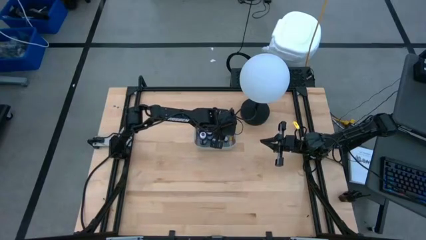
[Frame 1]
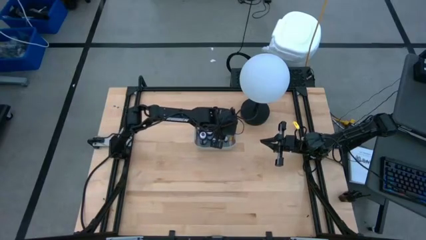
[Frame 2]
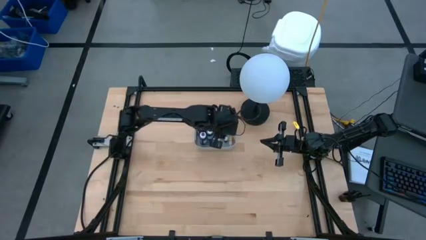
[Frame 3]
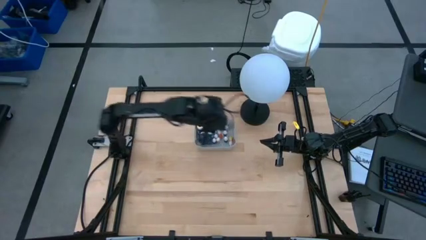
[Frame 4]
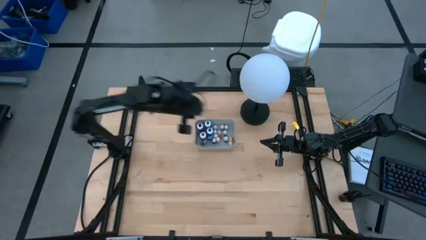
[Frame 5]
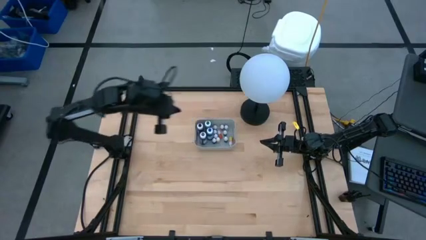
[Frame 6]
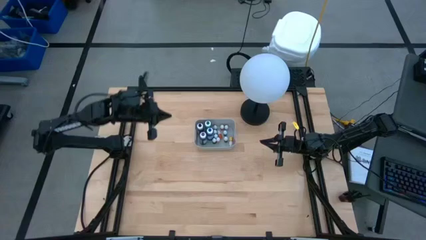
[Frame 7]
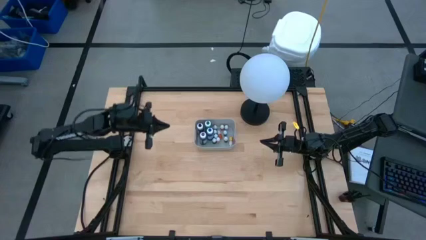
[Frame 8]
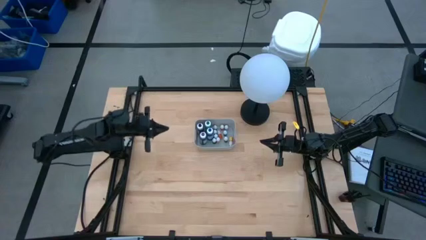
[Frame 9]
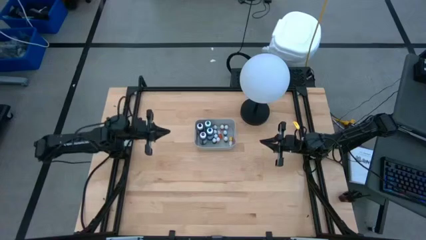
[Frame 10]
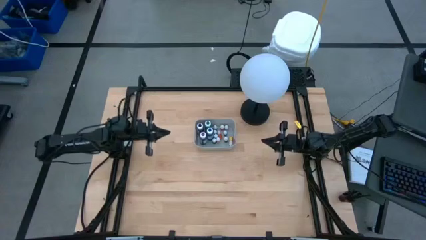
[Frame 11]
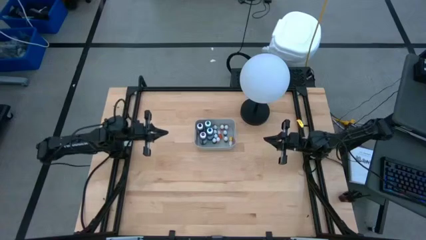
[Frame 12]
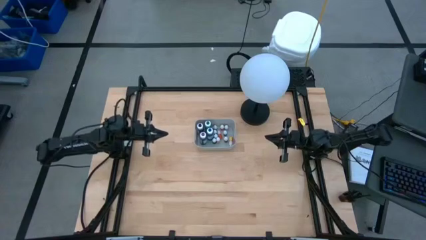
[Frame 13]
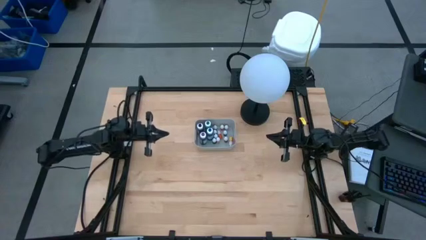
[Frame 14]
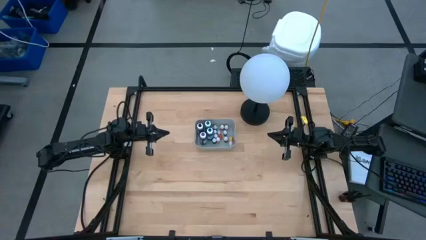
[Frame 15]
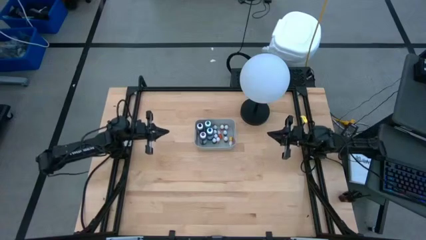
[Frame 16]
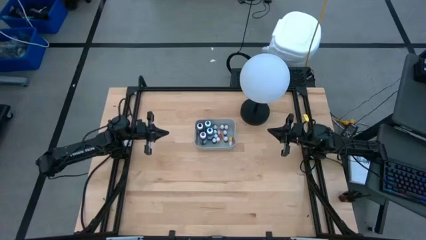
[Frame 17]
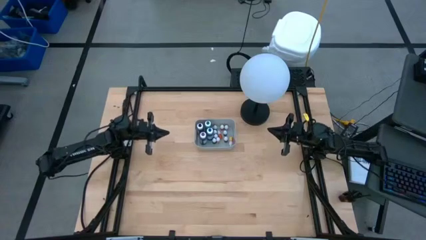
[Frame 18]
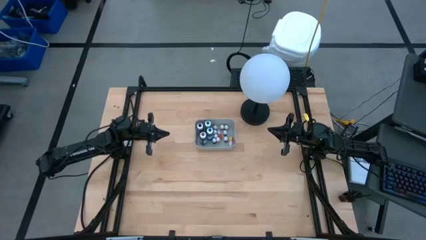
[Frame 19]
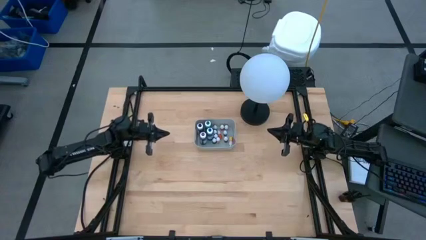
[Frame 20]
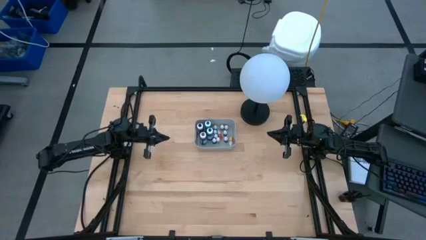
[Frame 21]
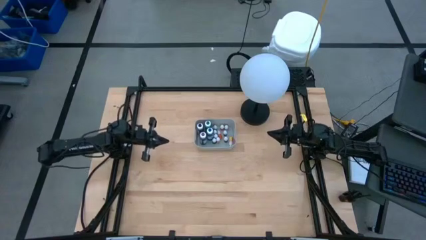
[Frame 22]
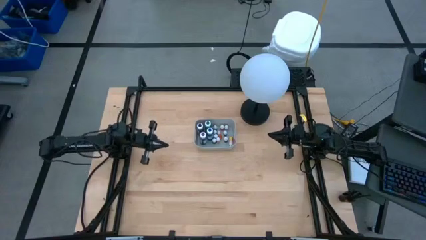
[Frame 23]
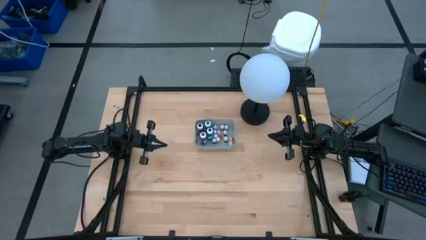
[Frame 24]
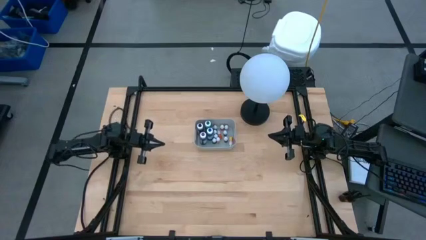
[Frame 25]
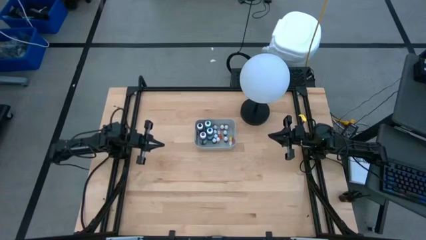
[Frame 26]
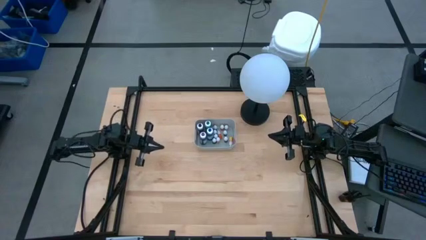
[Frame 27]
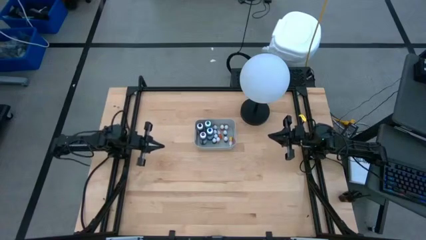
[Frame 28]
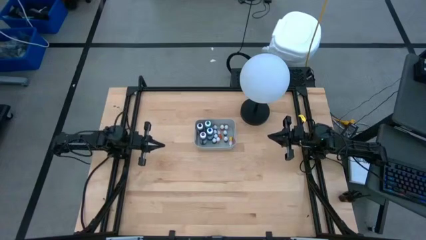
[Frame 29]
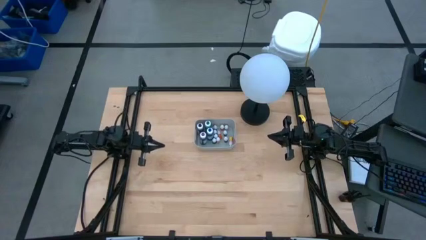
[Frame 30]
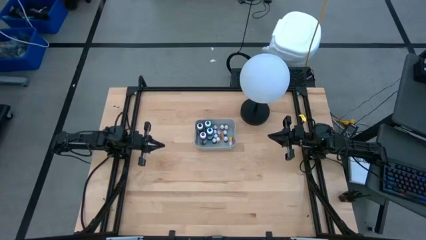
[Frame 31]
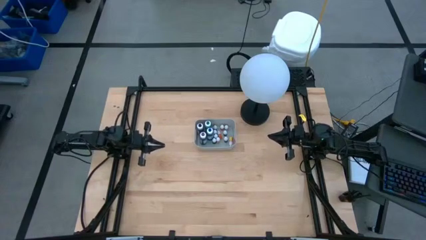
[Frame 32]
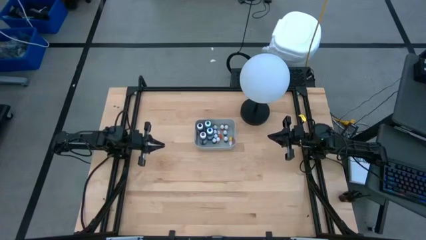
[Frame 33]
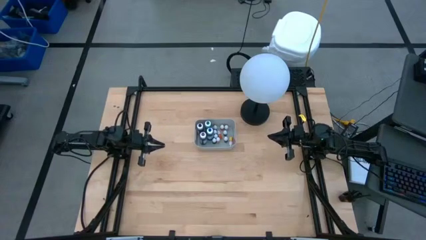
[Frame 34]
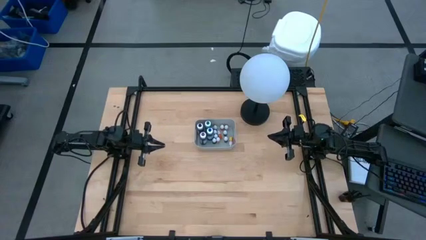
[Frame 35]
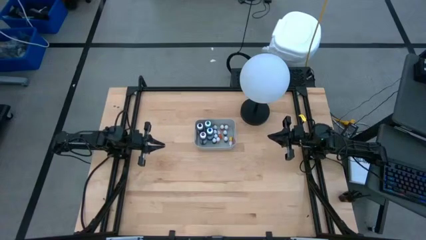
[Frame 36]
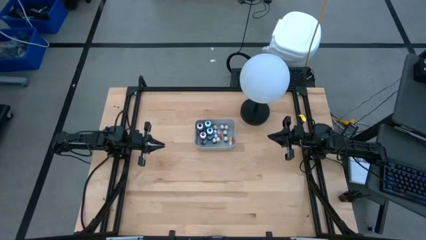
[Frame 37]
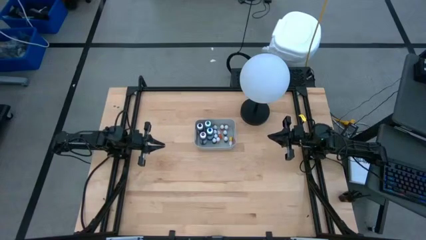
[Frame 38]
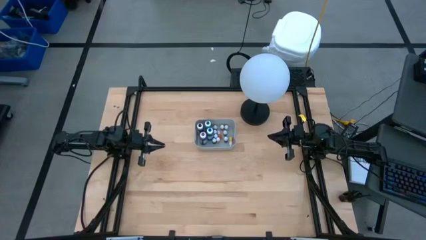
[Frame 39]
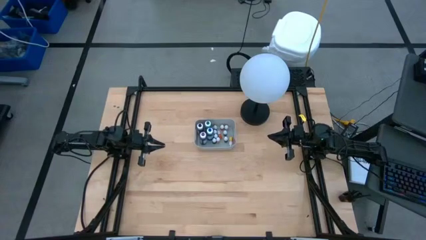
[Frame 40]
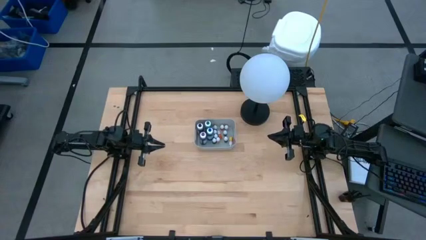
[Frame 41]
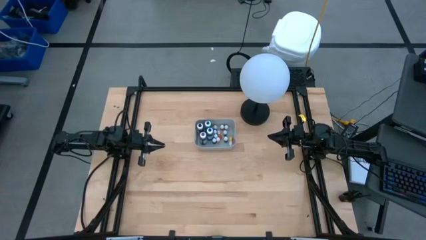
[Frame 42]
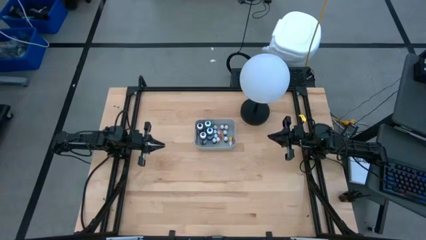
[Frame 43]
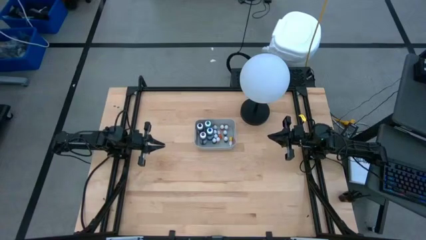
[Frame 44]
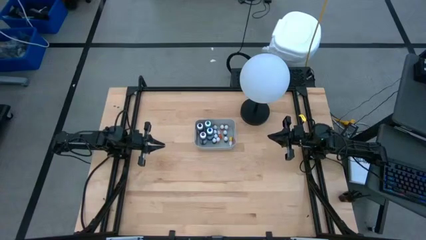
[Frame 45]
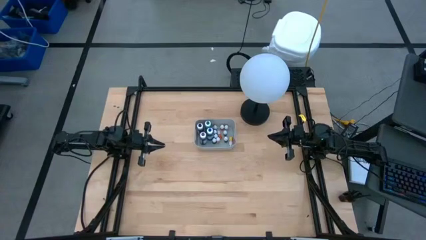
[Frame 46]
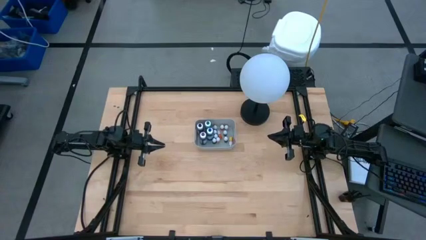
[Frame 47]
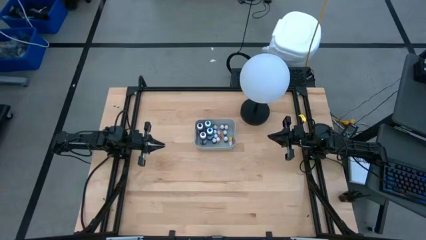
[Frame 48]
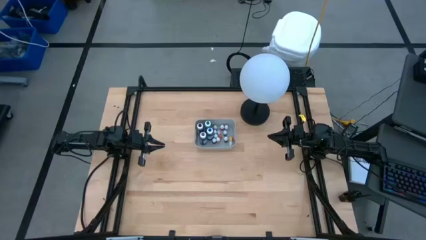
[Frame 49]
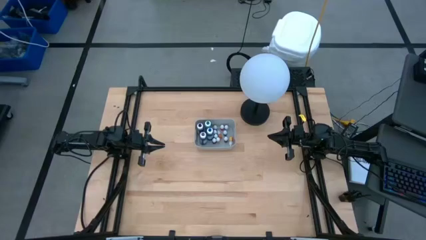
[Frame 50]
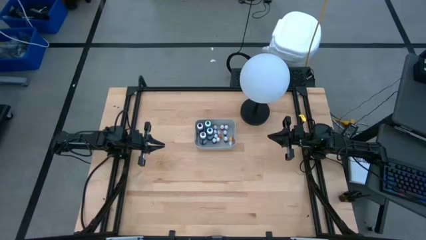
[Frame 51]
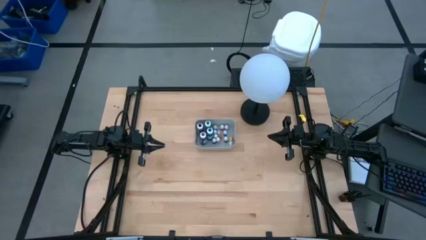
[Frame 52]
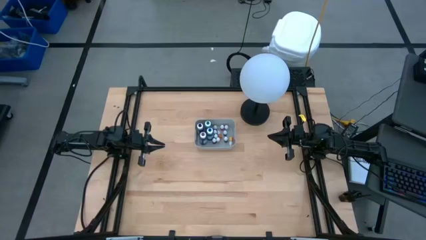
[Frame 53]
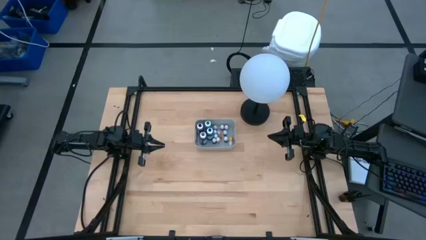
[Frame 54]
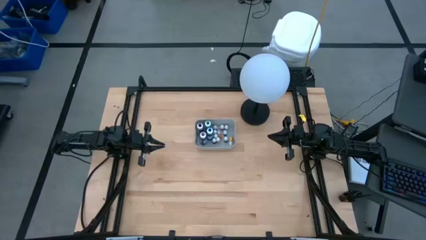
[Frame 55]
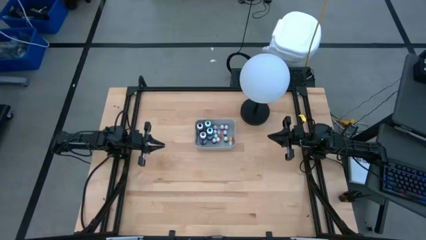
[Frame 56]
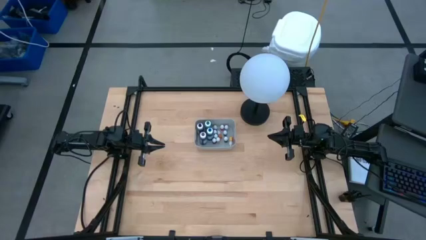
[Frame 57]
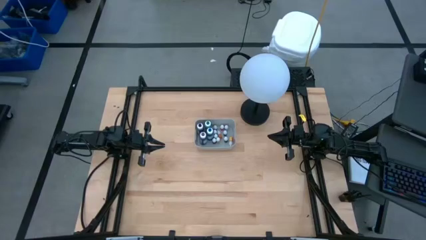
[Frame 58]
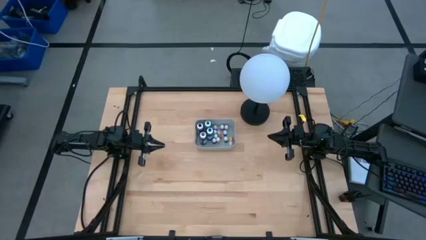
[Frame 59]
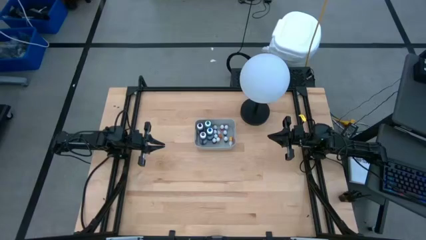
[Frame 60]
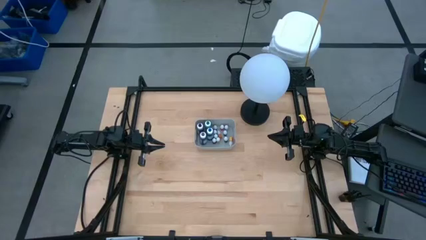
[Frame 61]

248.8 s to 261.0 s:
Task: Pick & Place food coloring
Return to Home Position

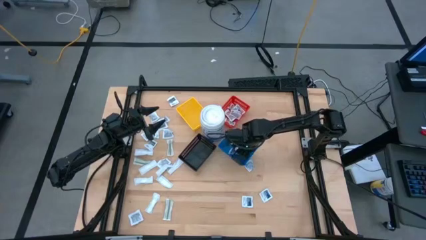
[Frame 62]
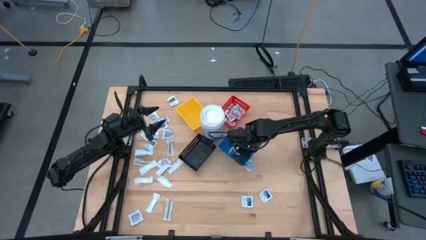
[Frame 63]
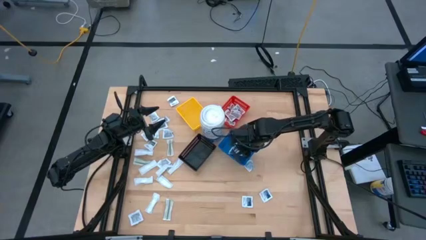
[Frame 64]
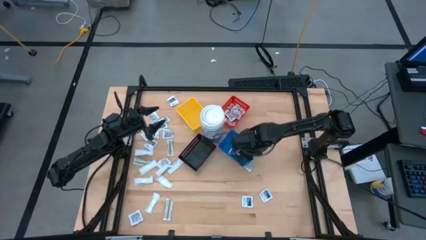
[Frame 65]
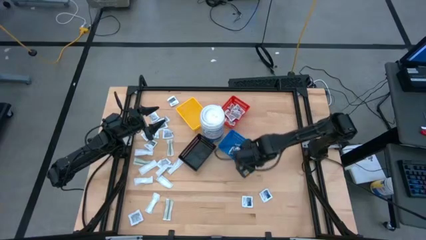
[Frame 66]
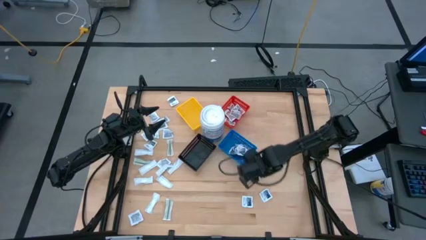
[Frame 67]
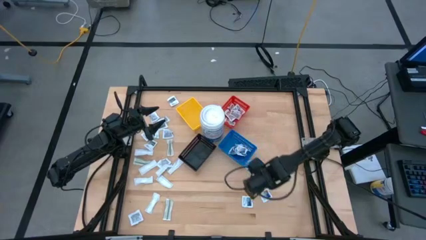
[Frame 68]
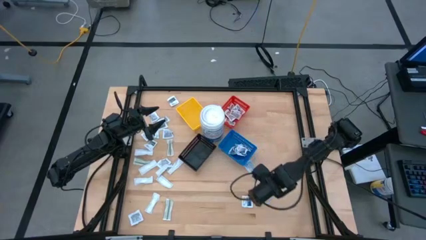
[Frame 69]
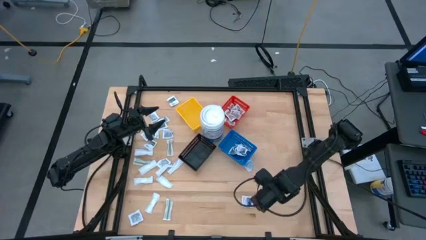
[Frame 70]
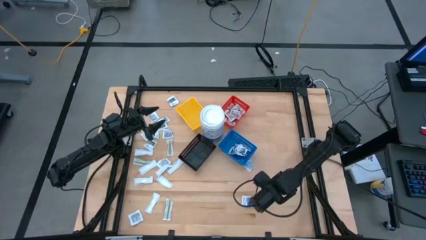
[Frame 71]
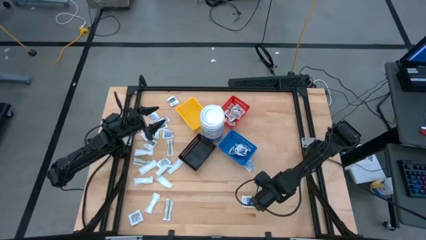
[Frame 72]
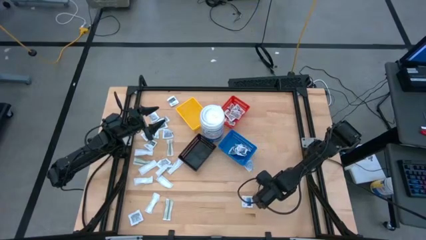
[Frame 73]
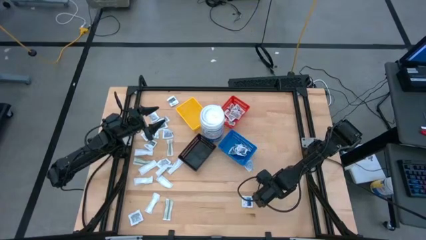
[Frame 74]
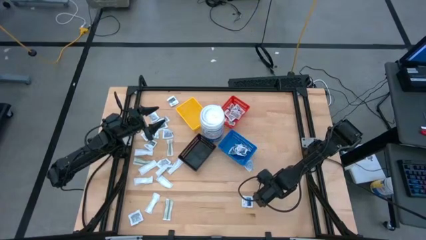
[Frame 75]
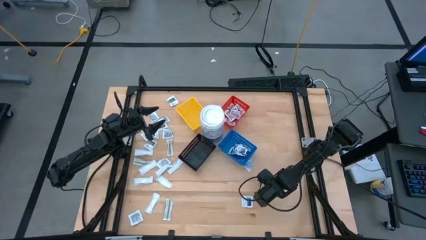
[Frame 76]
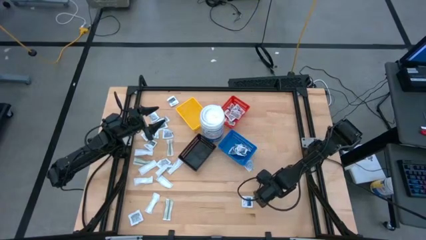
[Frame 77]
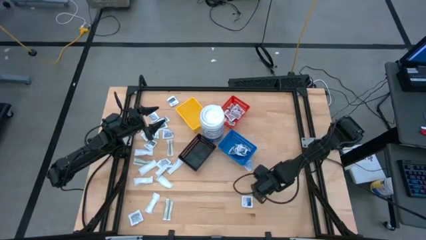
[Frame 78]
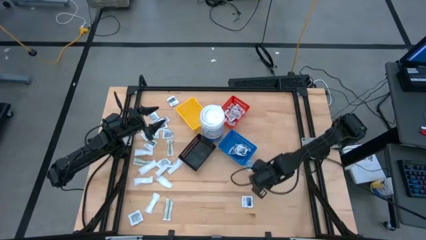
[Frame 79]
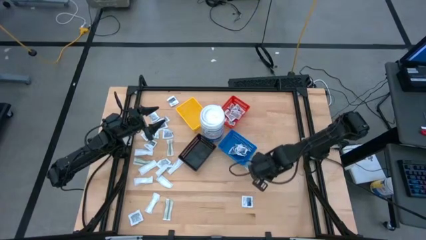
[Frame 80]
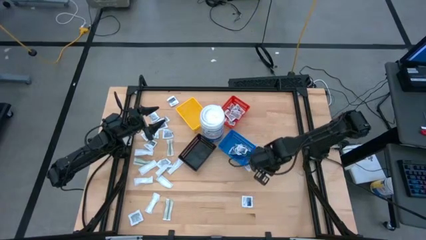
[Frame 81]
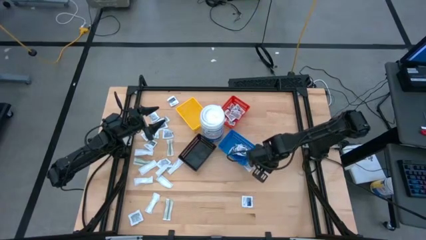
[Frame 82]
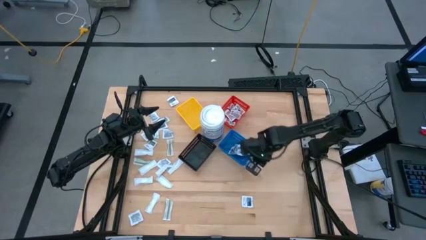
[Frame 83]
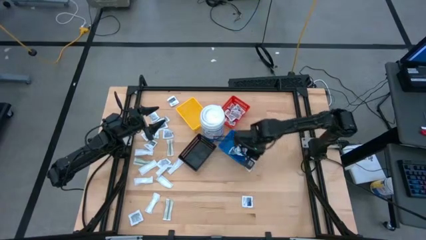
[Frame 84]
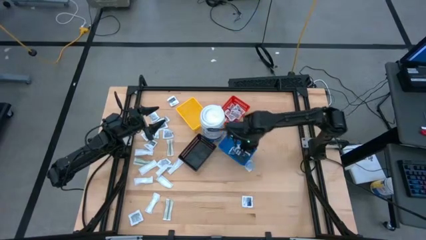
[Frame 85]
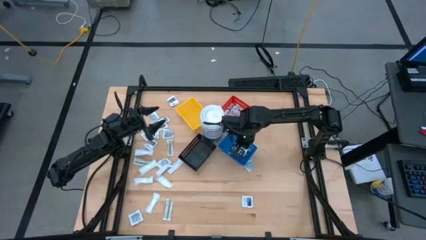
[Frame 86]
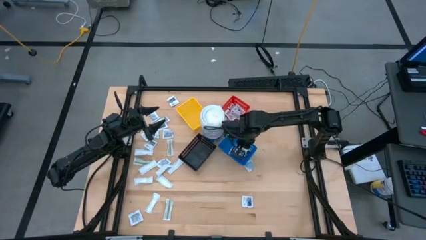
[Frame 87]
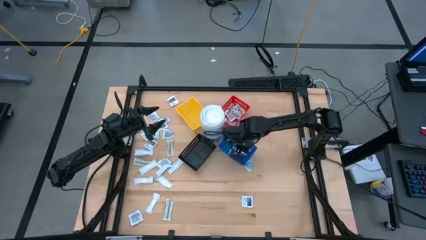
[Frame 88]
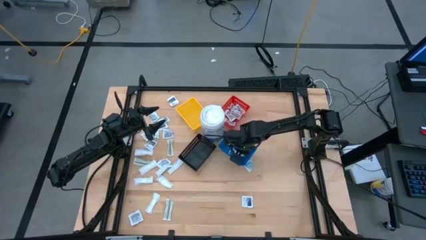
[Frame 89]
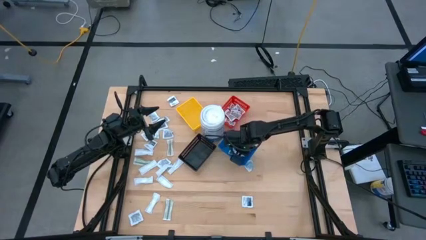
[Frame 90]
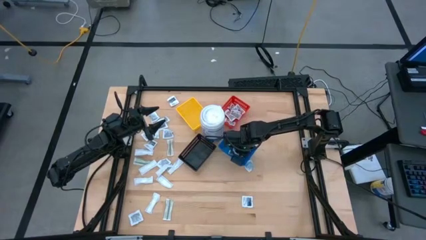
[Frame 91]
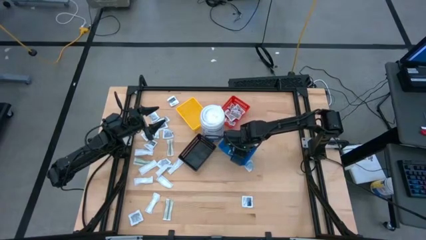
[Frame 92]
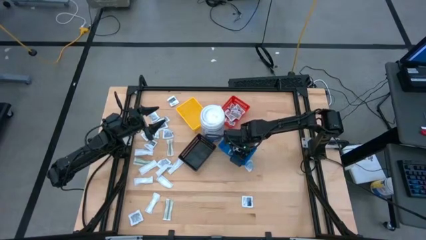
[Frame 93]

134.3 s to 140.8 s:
Task: Pick & Place First Aid Supplies
Put the alcohol pad into the blue bin
